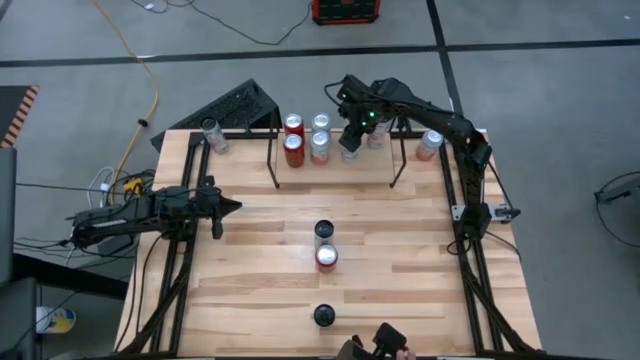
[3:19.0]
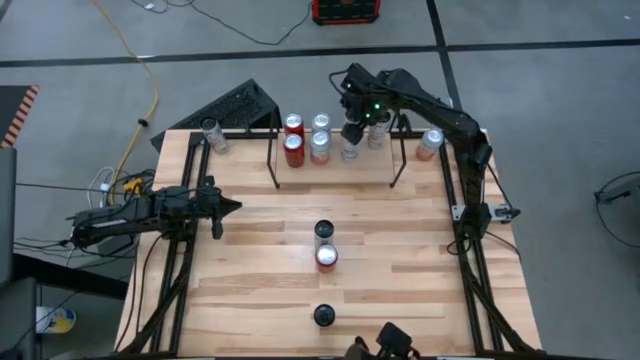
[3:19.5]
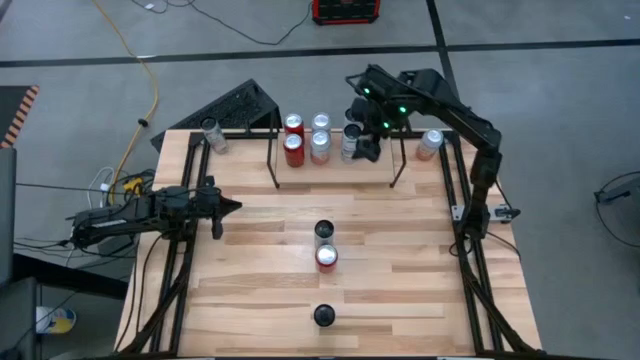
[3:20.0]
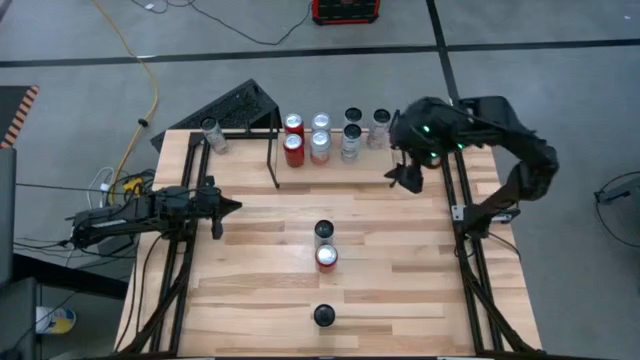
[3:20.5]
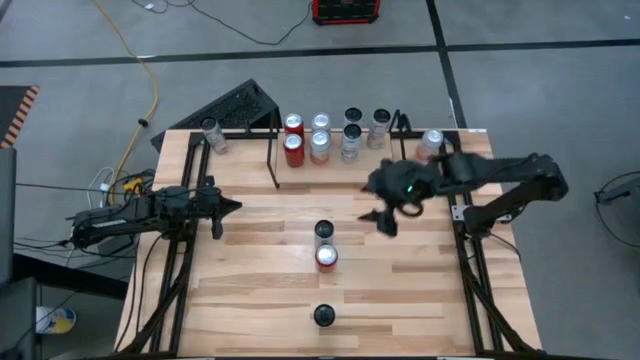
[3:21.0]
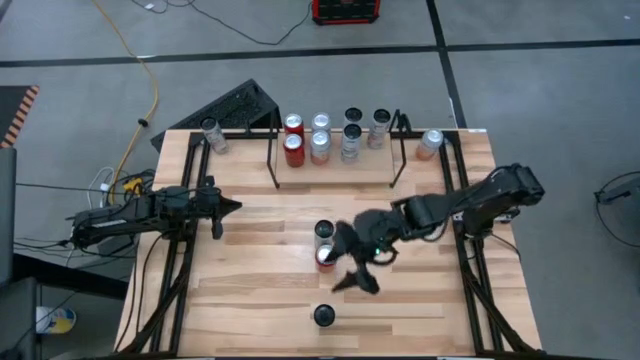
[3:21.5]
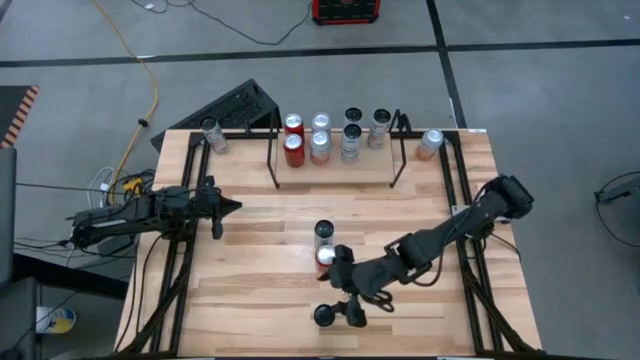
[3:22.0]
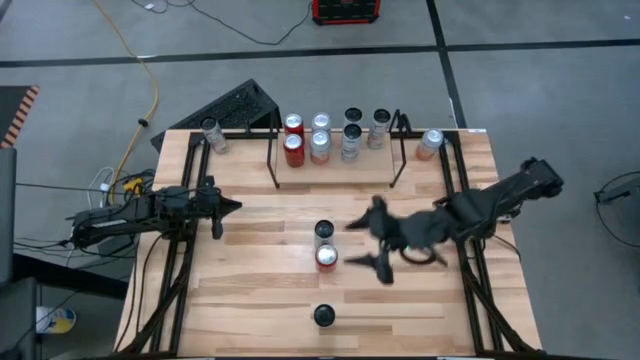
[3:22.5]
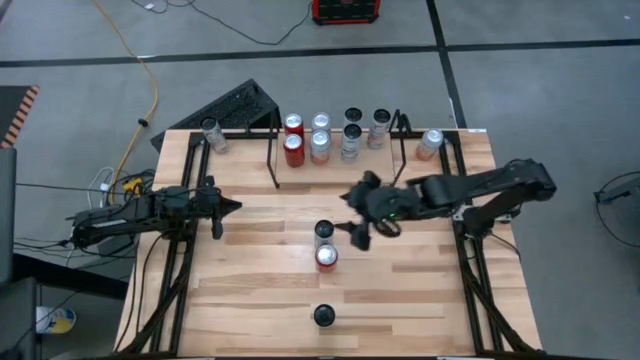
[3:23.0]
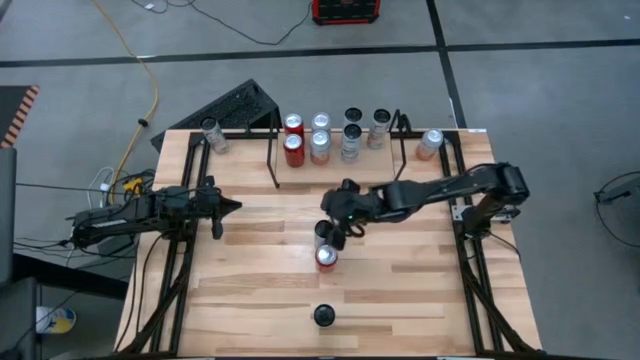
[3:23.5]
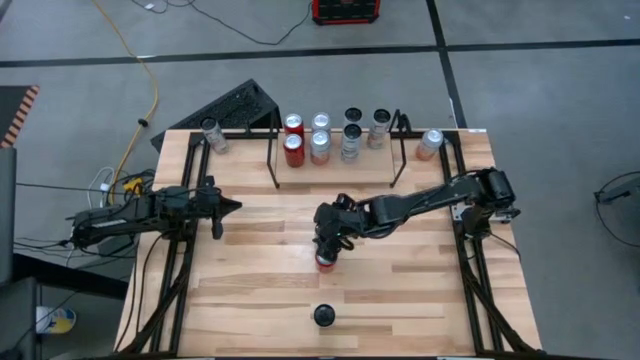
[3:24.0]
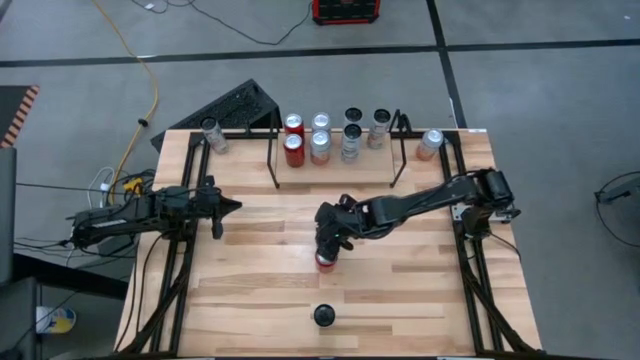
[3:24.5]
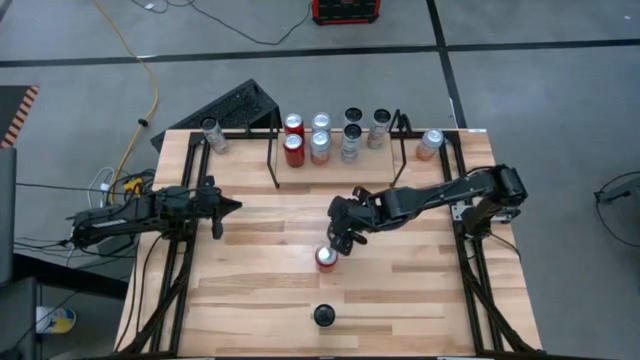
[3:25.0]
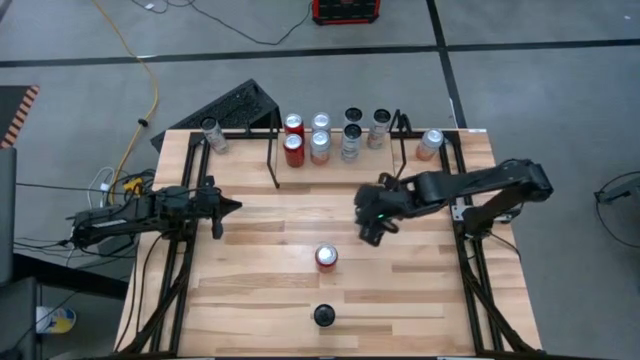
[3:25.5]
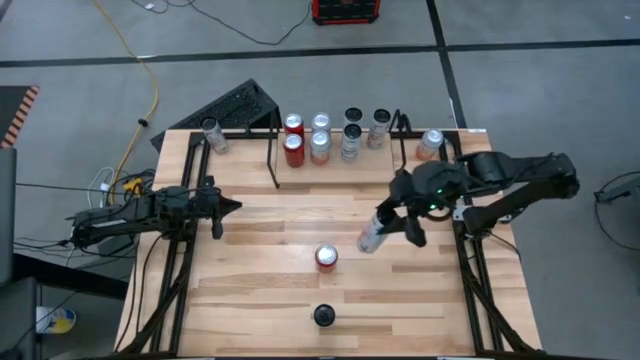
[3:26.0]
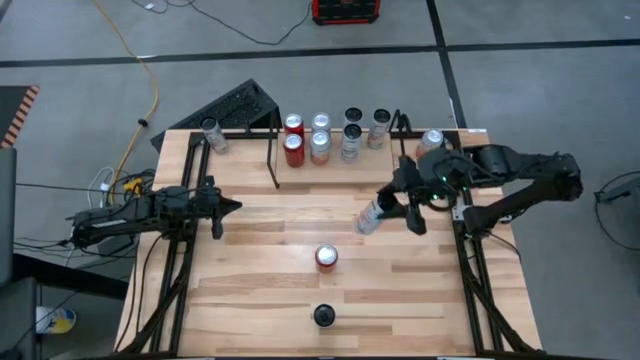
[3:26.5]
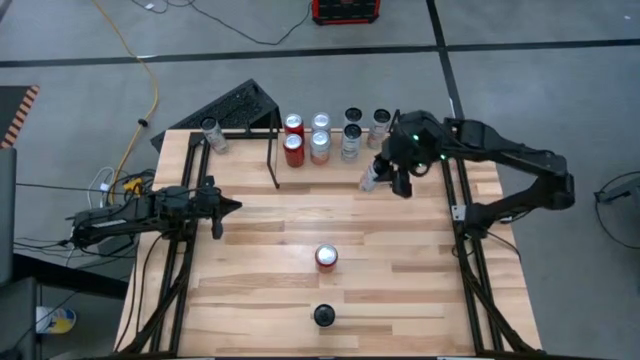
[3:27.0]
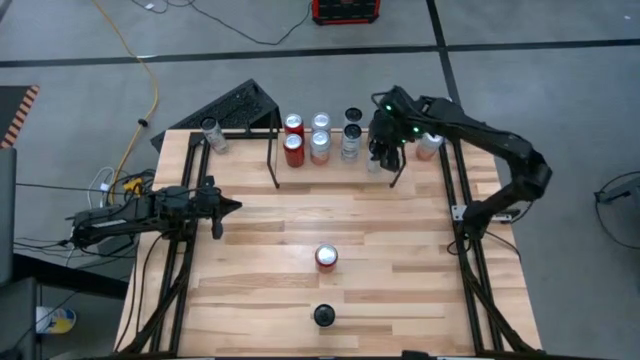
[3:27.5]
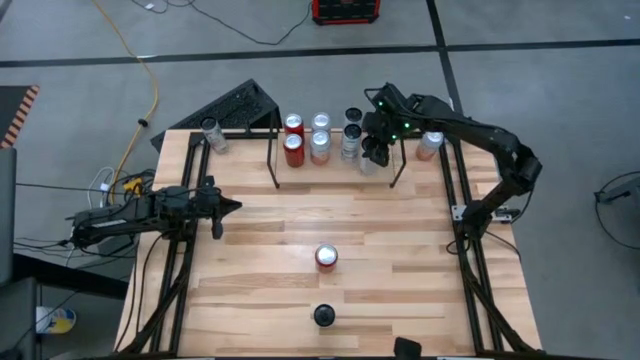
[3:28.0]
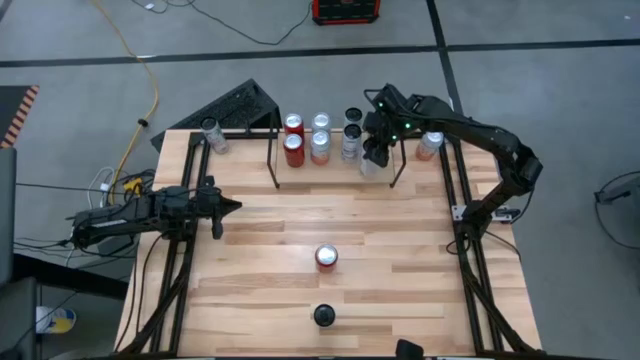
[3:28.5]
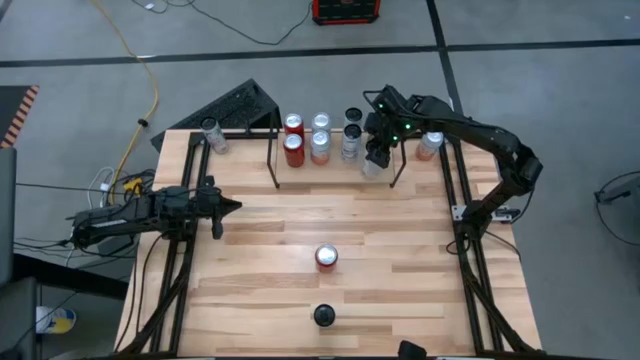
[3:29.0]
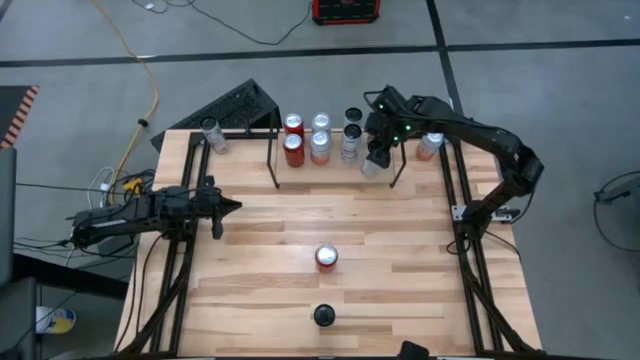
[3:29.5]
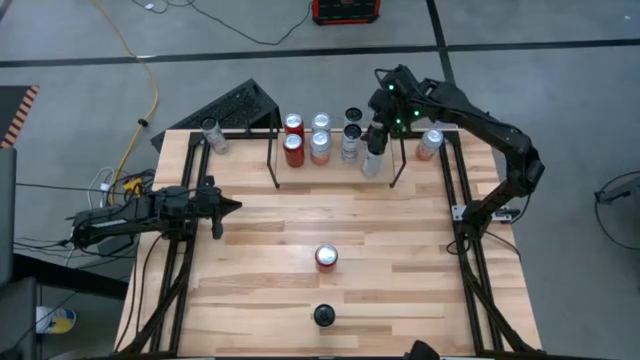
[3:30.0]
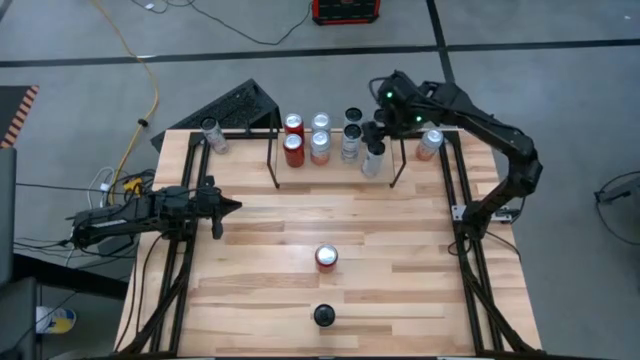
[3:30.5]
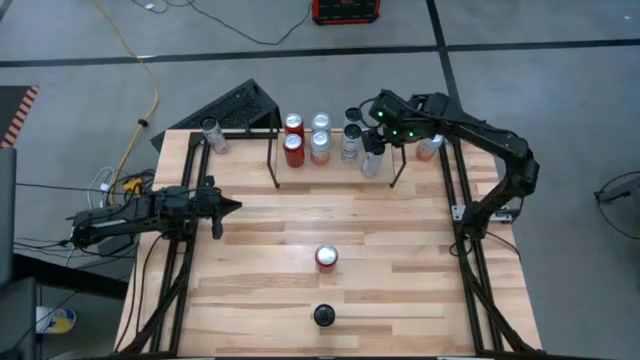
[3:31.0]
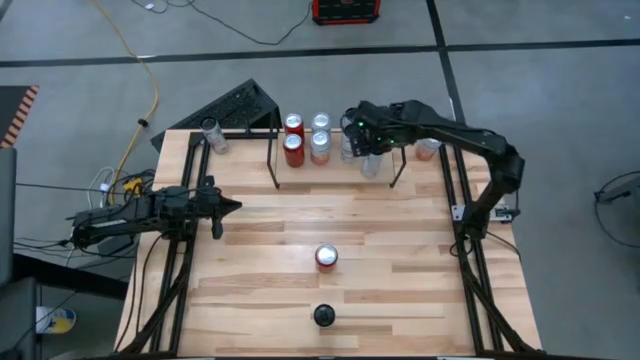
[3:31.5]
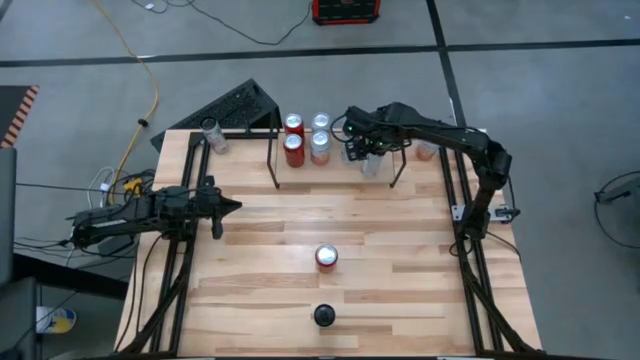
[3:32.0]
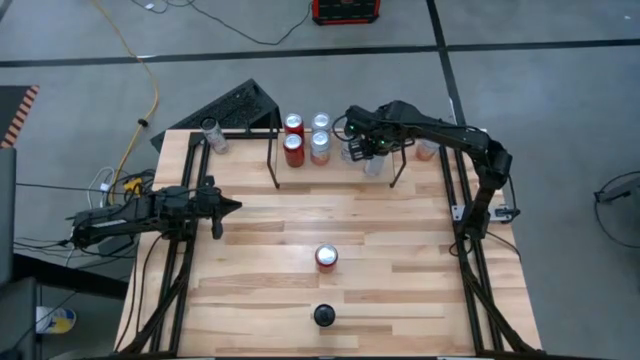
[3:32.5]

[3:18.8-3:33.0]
Task: Place canned beverage on shelf
Put the bottom white pink soda can on the shelf aligned with the other white pink soda can
